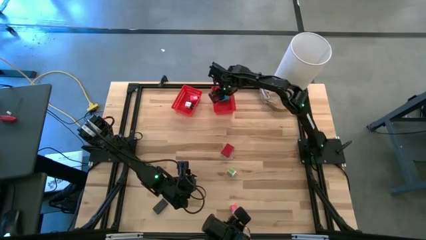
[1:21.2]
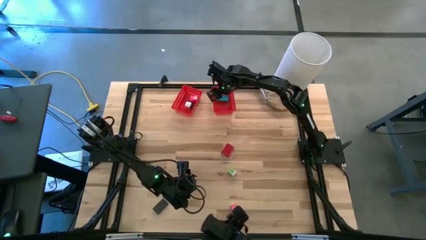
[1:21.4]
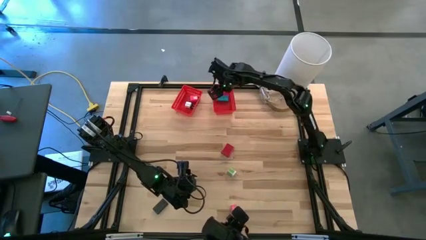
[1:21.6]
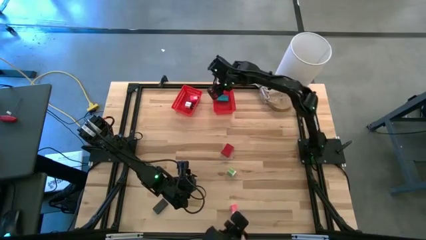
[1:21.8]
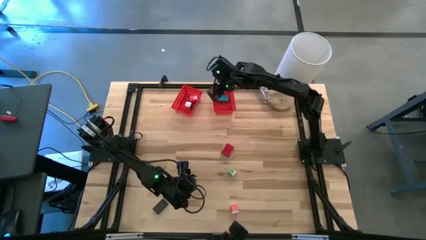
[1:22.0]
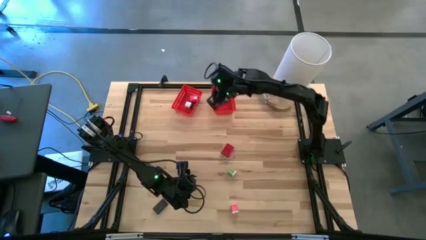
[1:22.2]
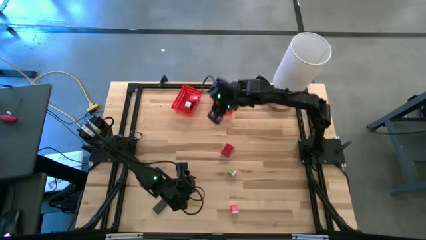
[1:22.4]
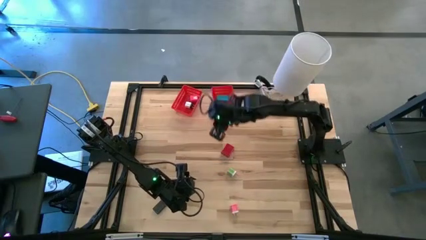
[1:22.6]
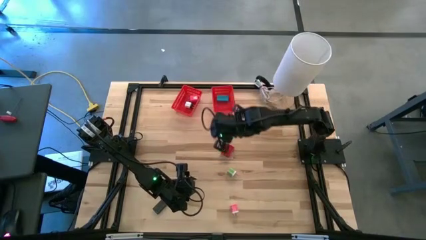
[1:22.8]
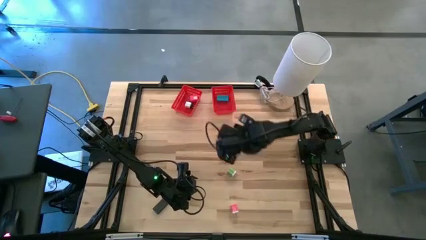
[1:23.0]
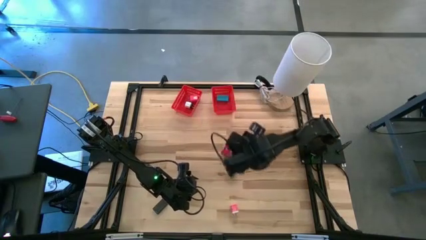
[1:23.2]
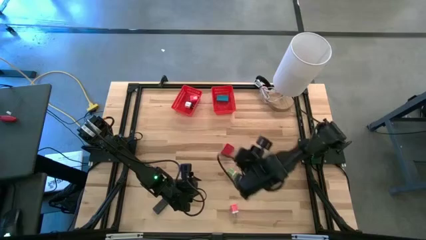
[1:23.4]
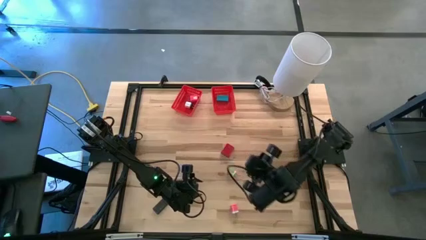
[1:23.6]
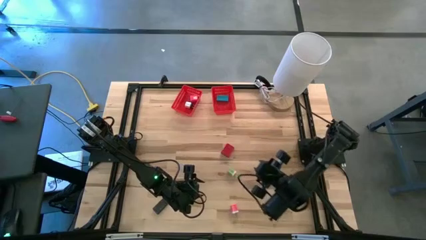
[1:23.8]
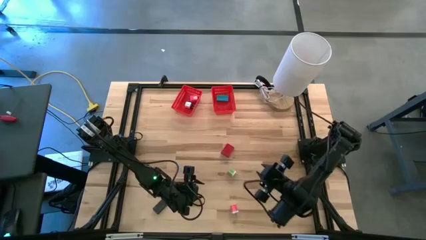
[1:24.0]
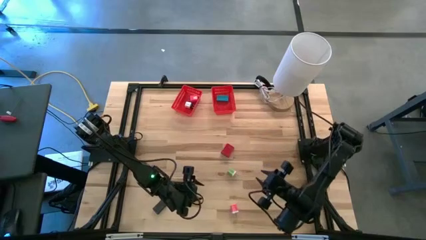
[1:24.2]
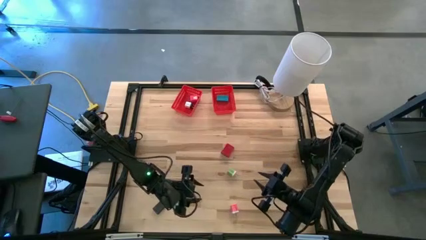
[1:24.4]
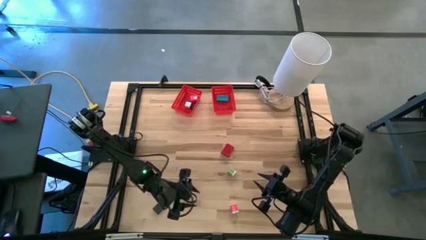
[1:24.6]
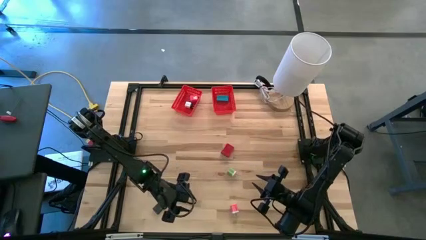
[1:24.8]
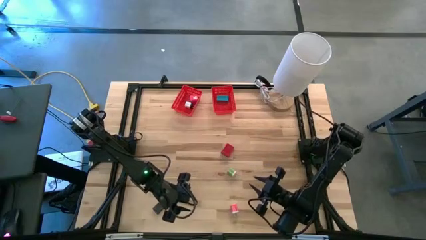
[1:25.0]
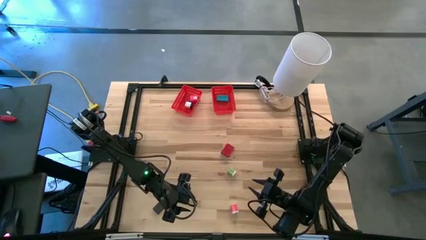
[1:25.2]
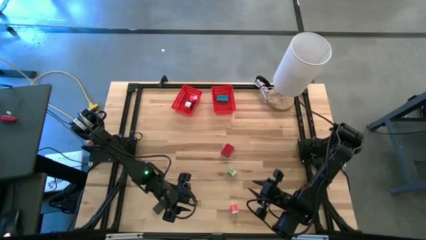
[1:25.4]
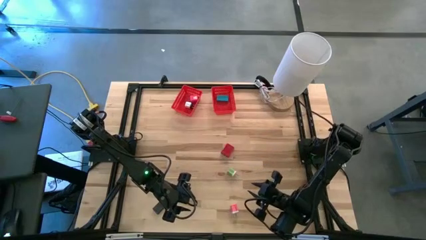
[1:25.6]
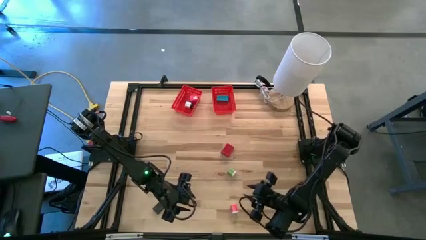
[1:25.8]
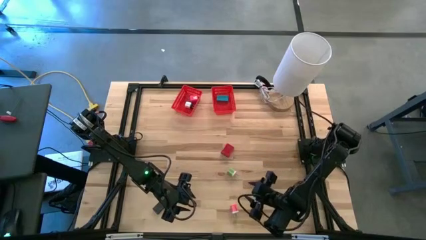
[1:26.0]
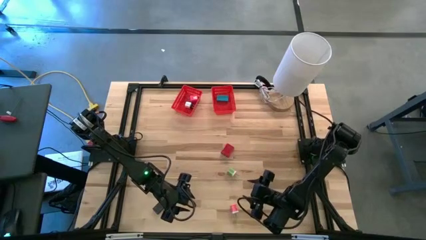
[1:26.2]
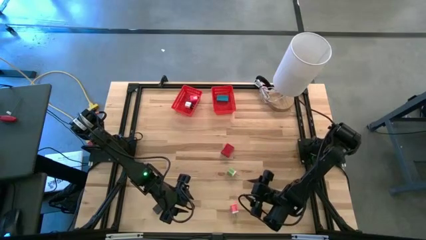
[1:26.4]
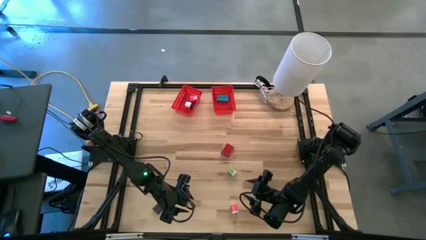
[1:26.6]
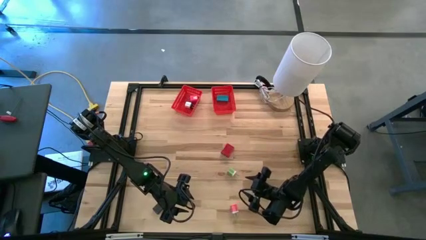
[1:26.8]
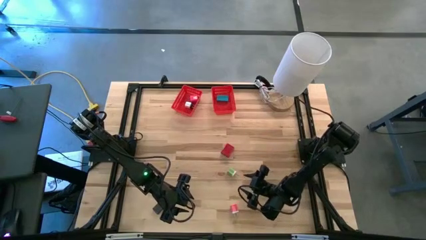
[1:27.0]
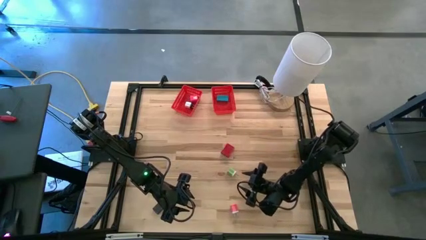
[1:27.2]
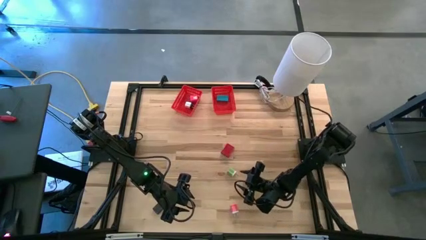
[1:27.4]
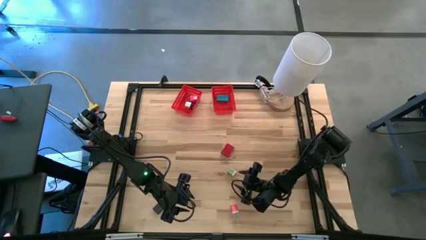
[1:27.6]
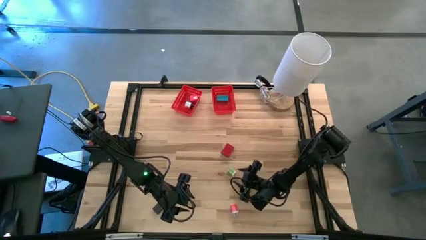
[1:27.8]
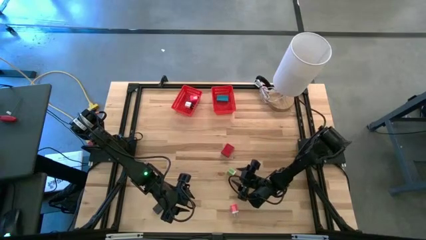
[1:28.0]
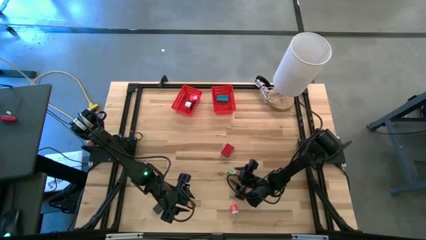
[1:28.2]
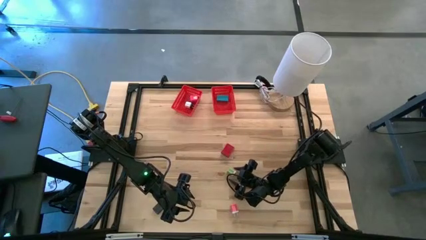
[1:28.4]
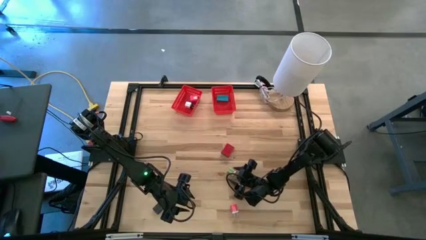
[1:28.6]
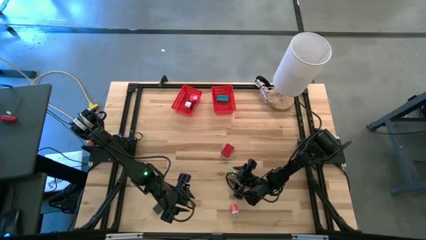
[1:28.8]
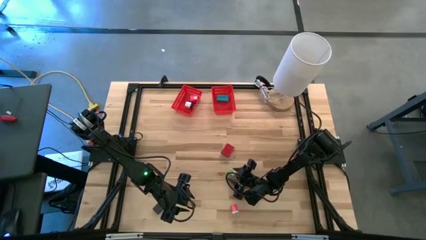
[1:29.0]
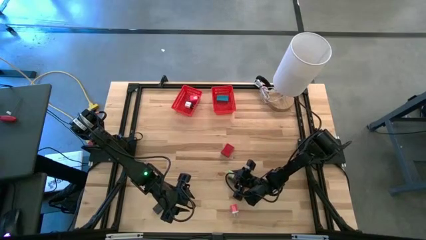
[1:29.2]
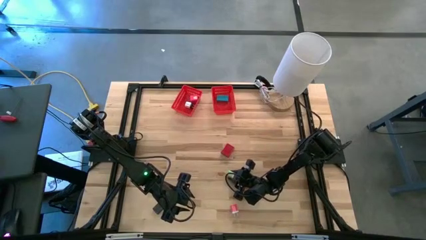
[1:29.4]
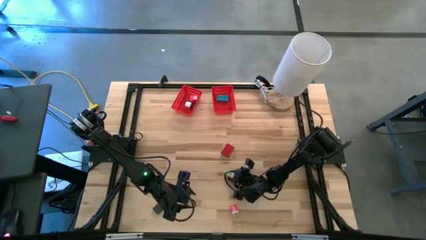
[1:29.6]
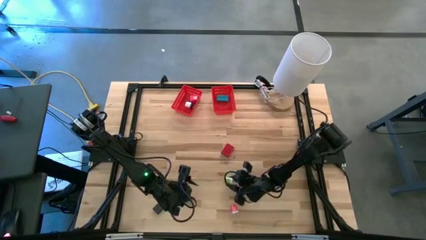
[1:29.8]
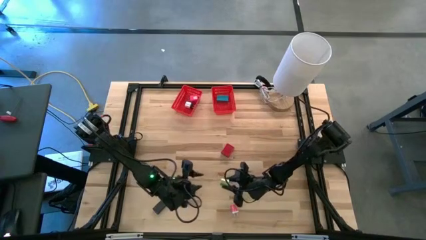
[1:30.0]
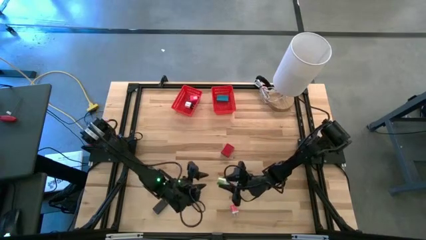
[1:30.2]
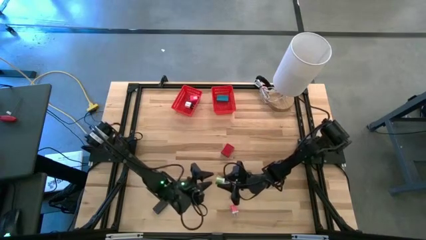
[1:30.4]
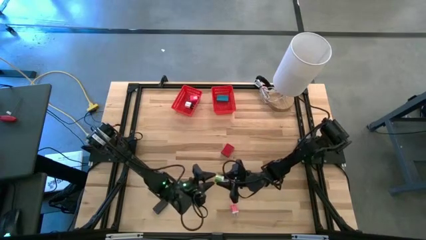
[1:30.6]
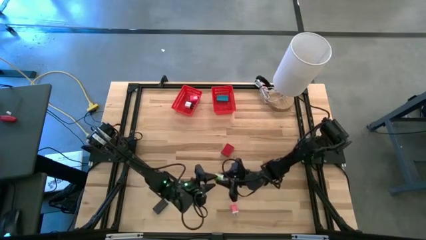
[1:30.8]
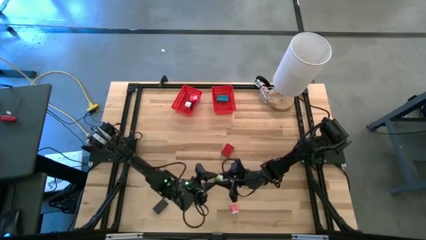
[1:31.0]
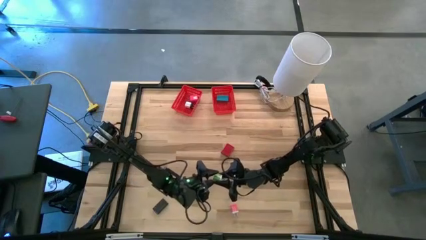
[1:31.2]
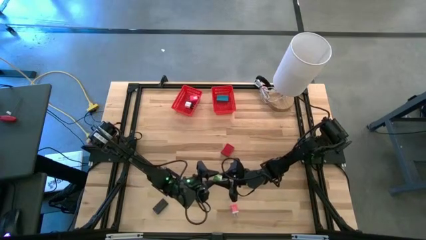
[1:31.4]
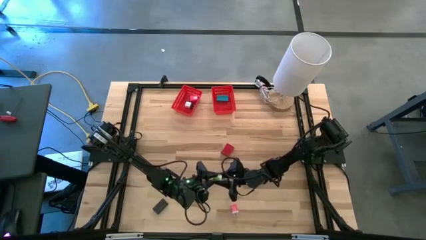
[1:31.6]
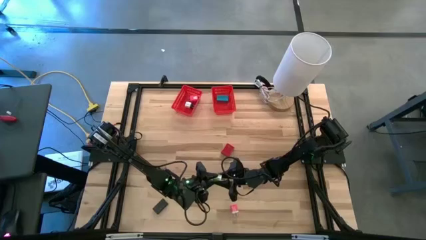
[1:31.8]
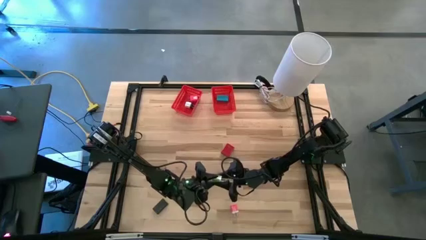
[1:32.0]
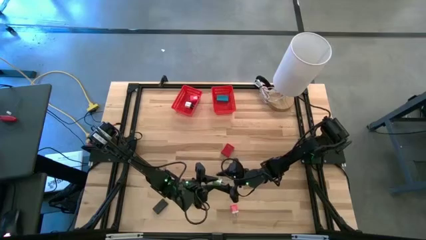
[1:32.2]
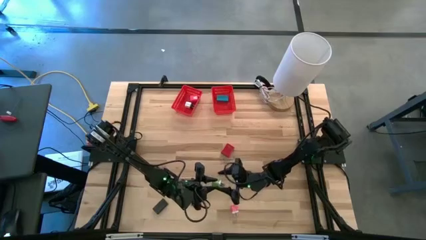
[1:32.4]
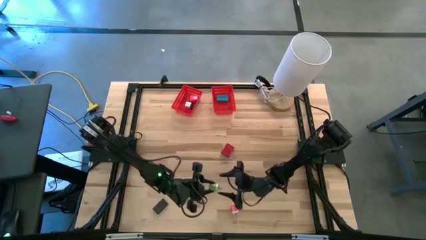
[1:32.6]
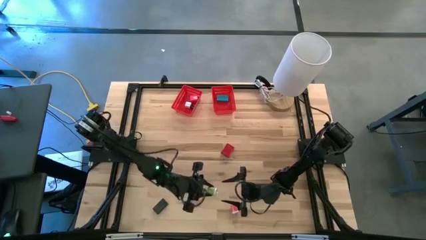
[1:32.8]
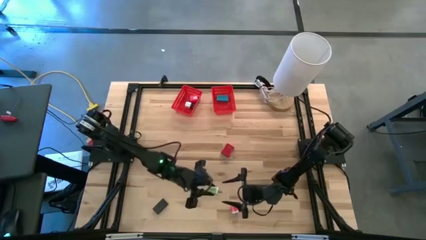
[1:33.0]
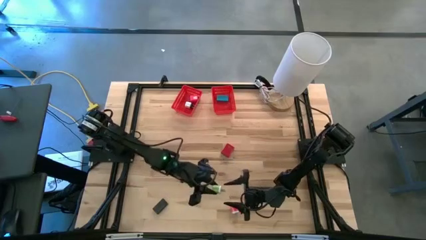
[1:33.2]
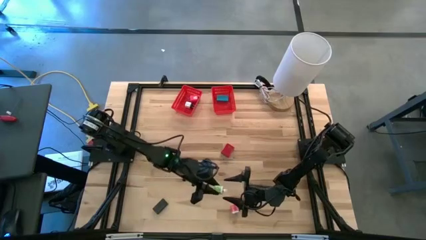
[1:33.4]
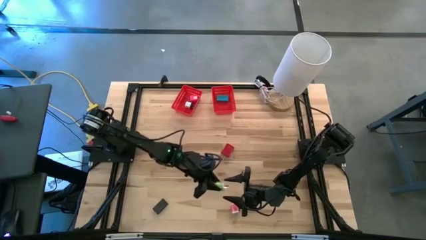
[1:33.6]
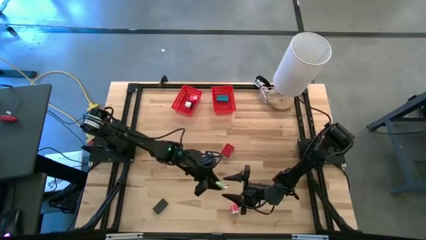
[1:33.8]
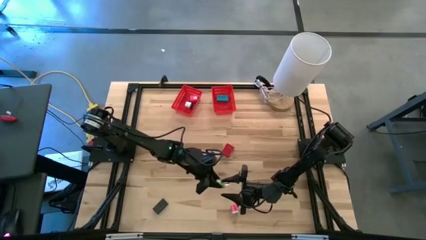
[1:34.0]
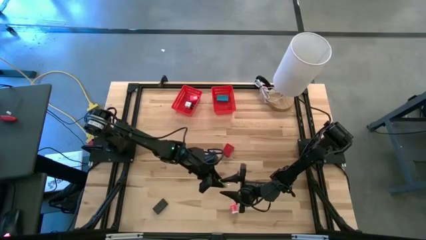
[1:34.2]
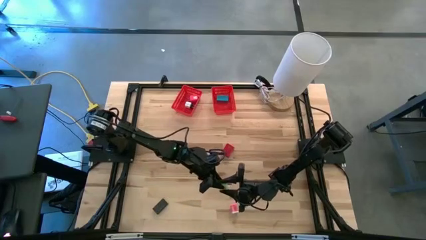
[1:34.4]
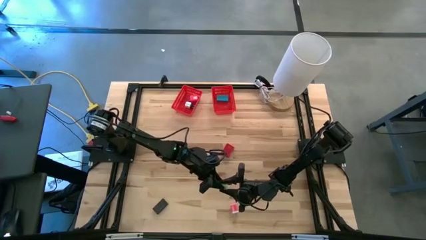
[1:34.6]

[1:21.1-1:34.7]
Task: Pick & Place Office items
Put the green charger adapter into the left red bin
